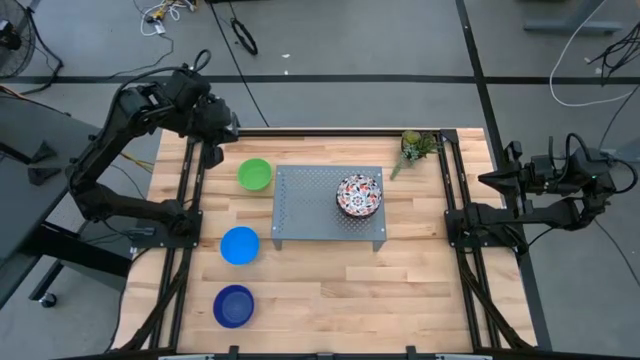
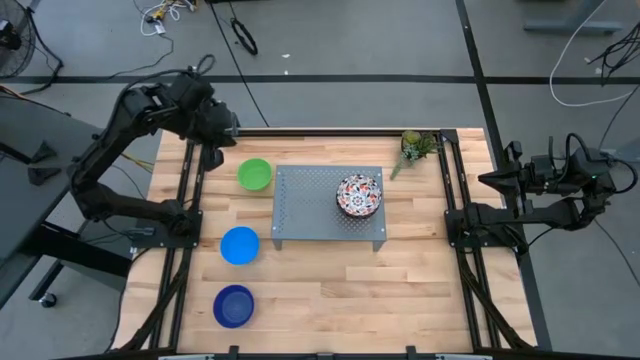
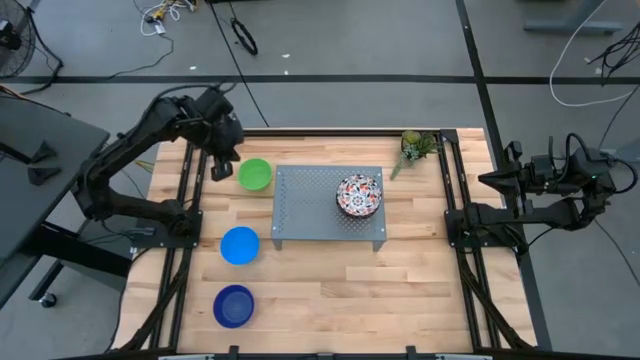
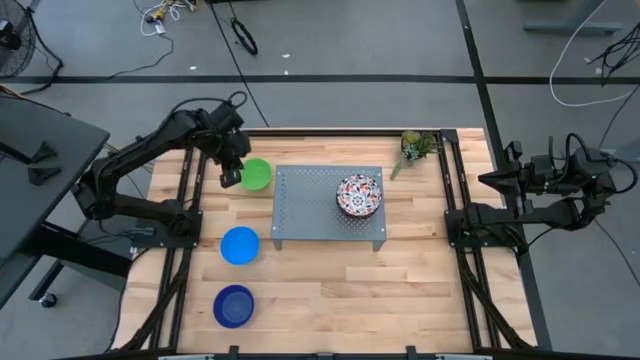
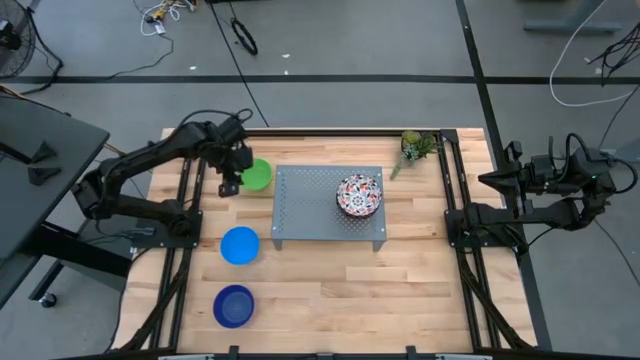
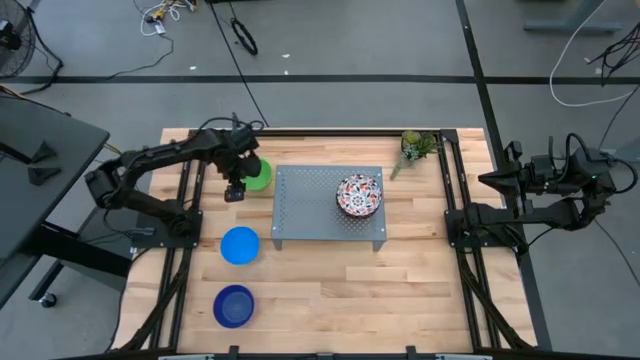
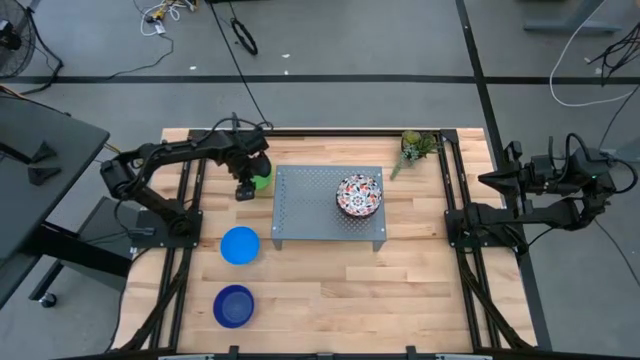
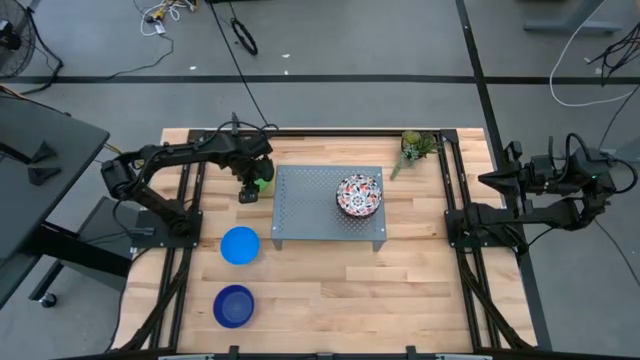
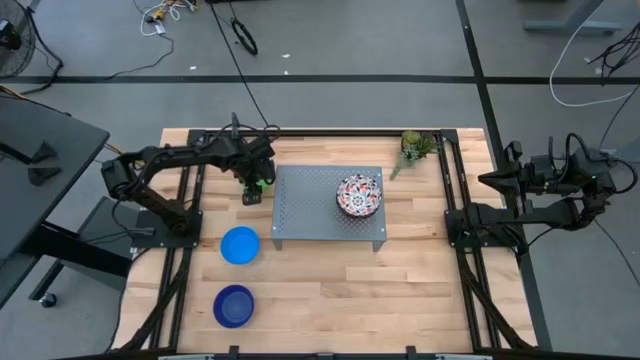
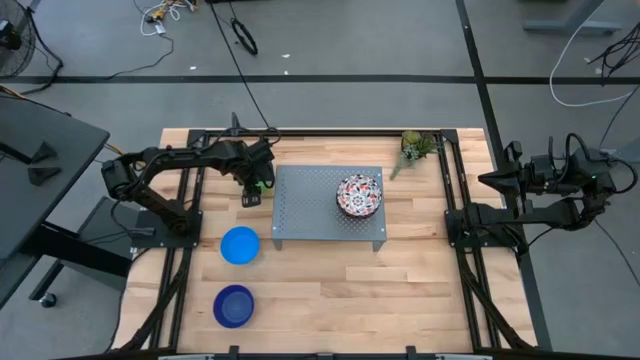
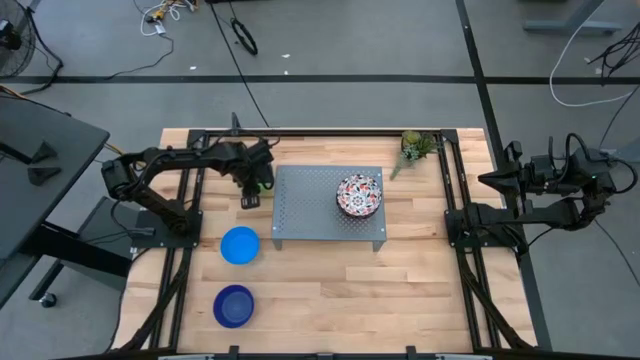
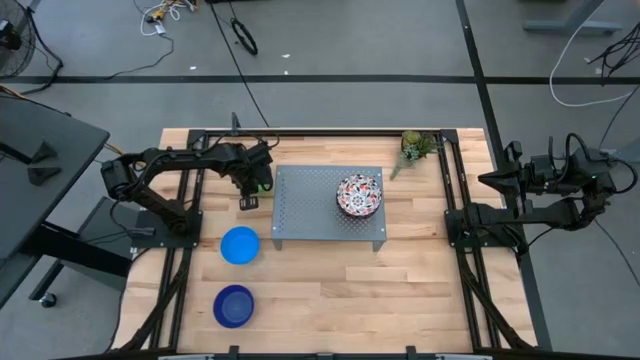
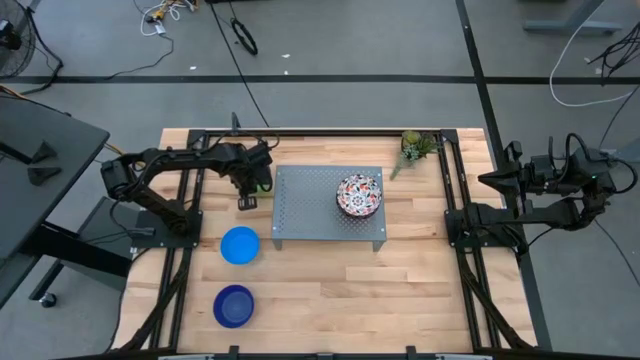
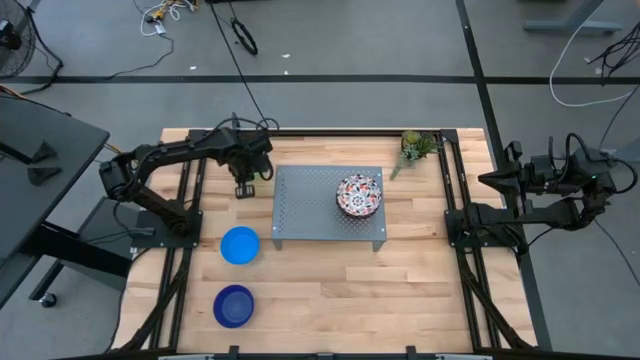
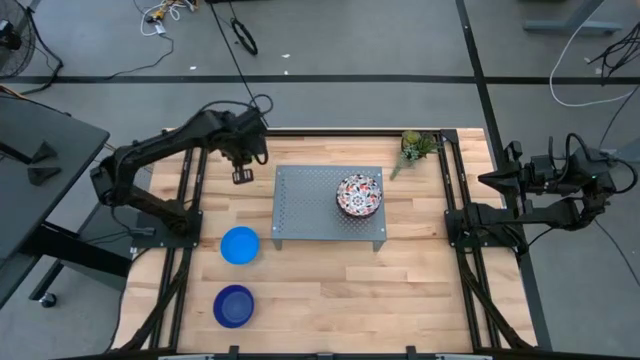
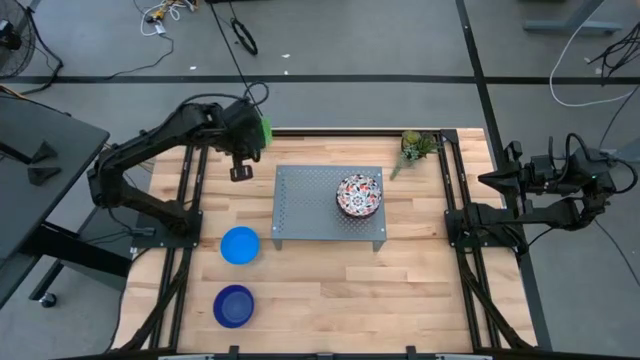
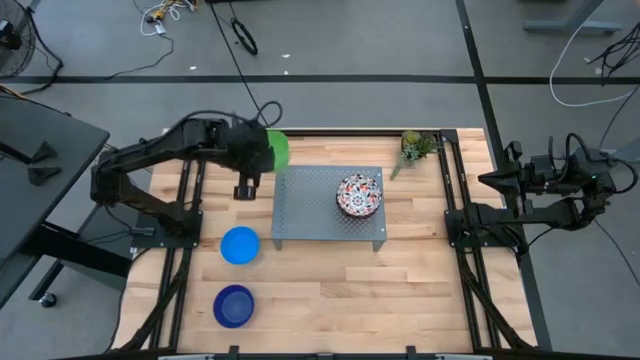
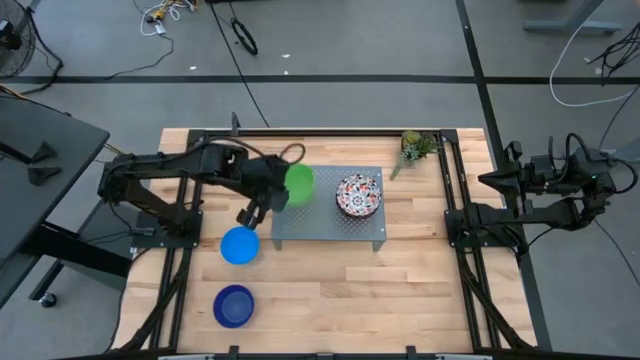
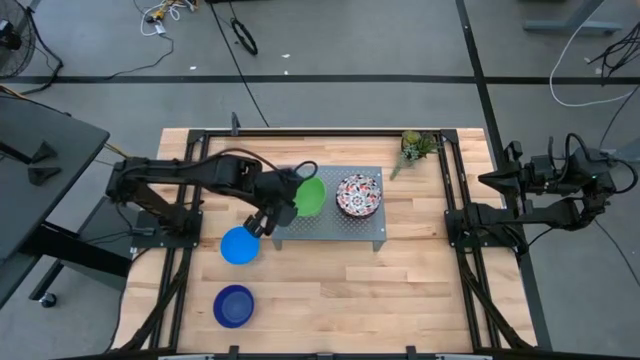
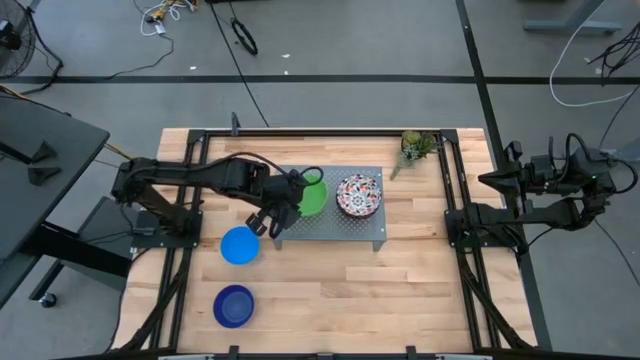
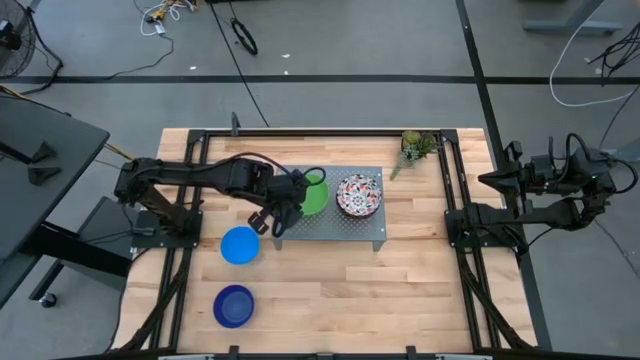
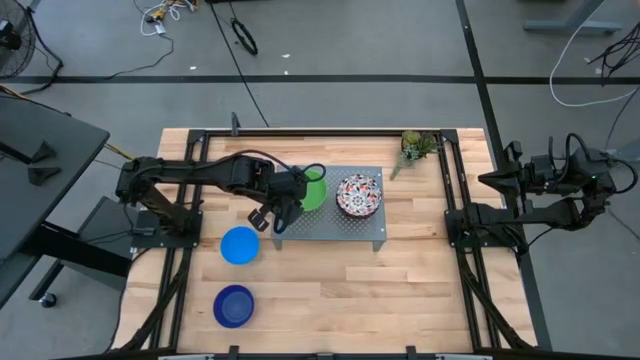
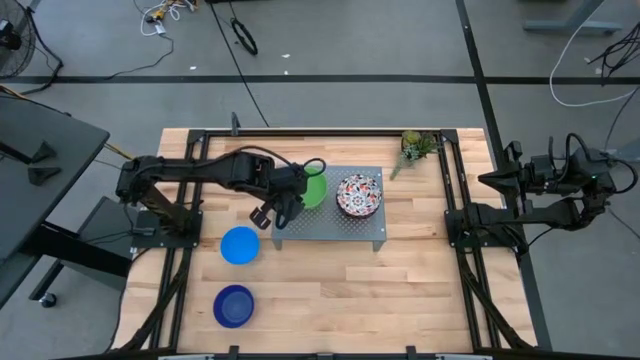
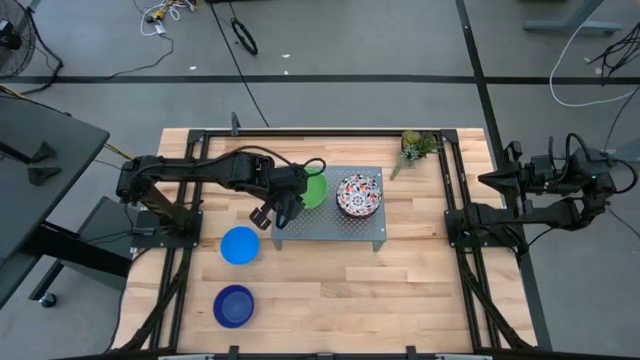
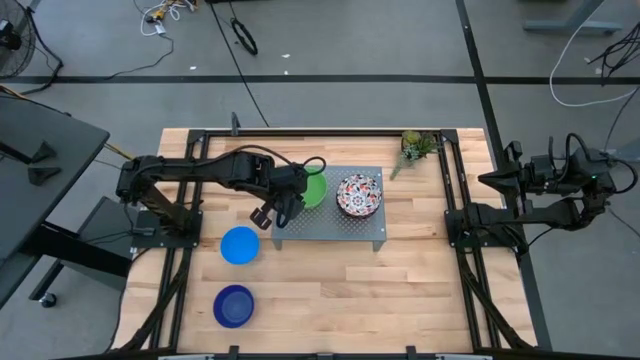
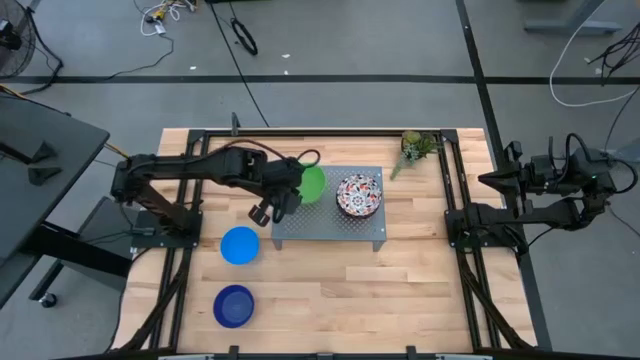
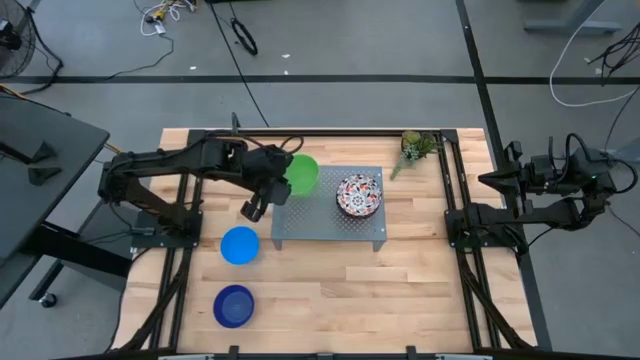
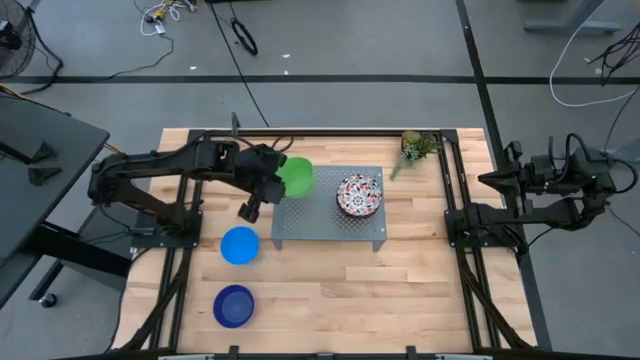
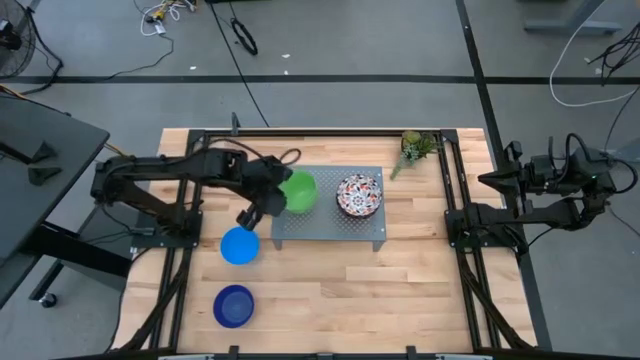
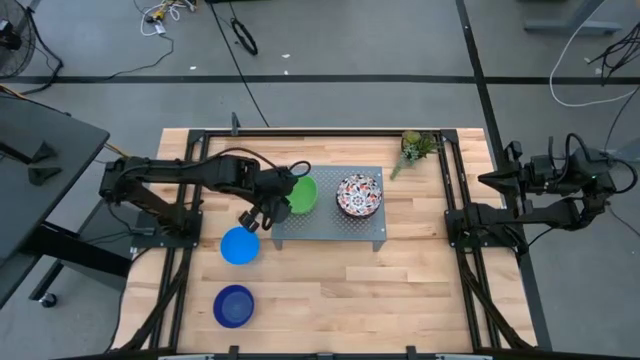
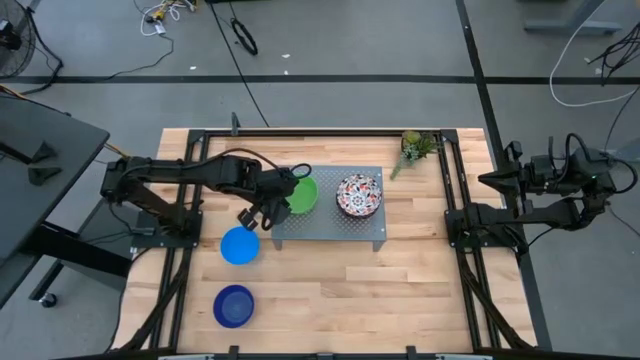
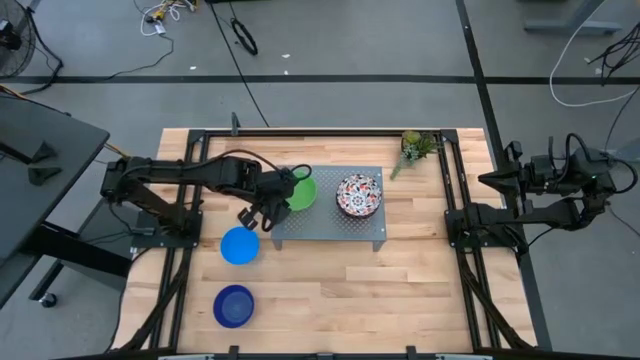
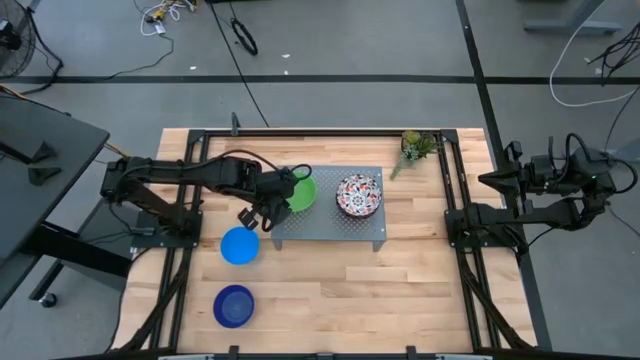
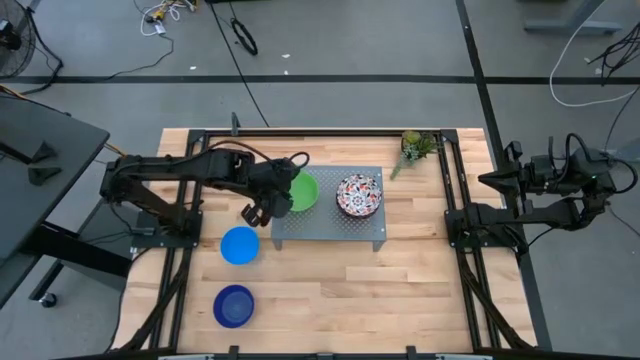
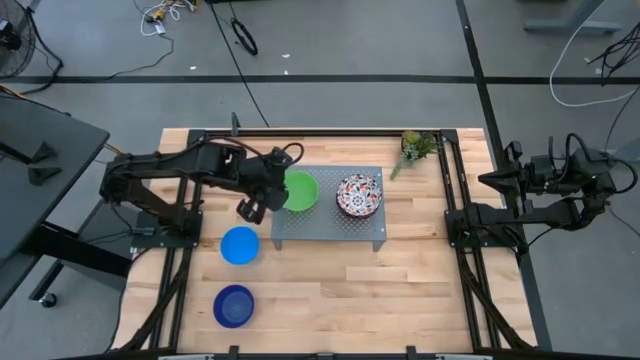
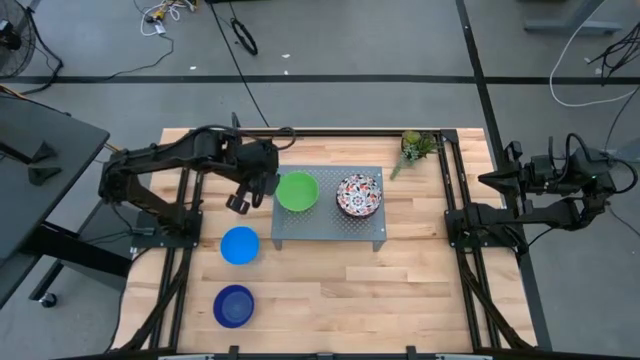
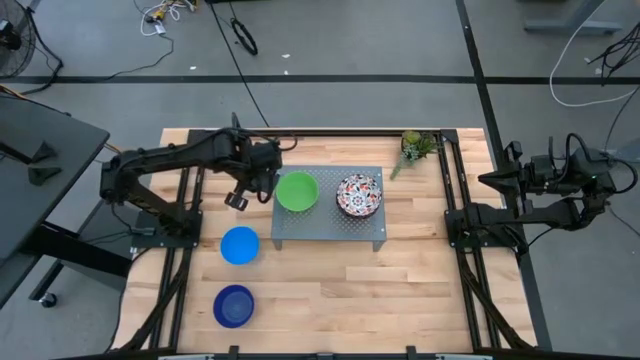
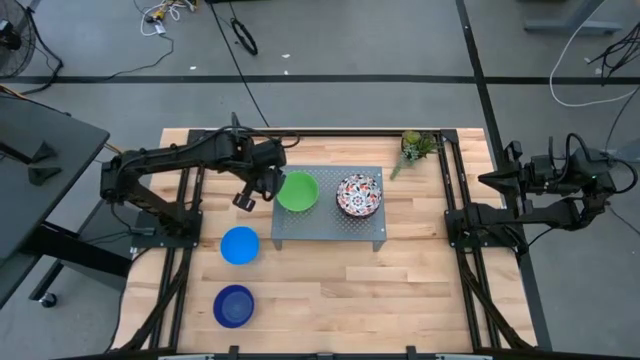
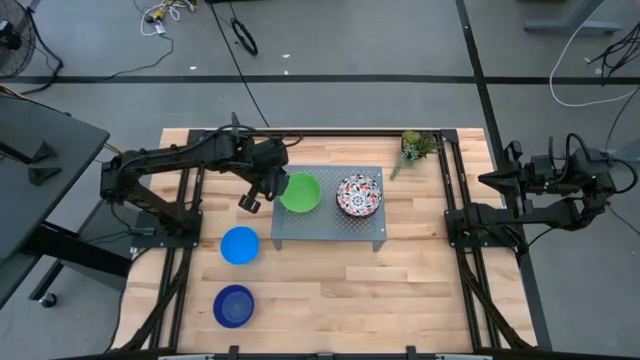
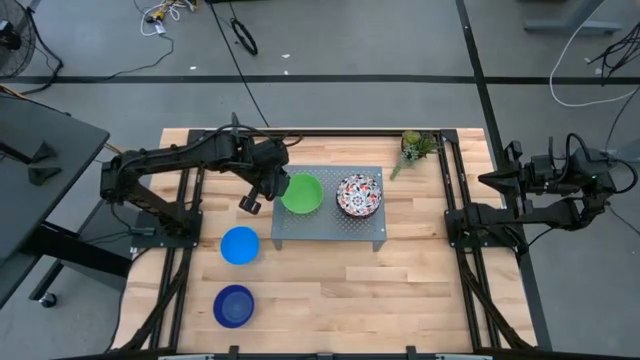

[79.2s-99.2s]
Task: Pick & Place Mini bowls
Put the light green plastic bowl on the shelf

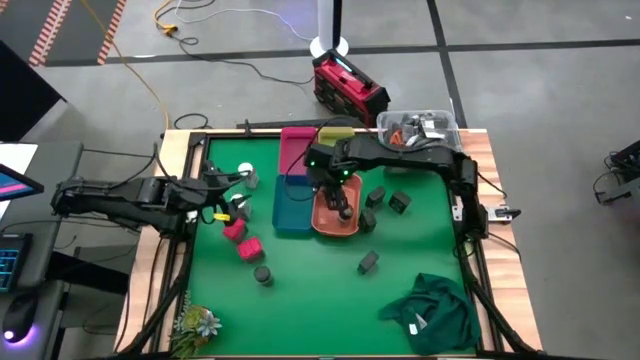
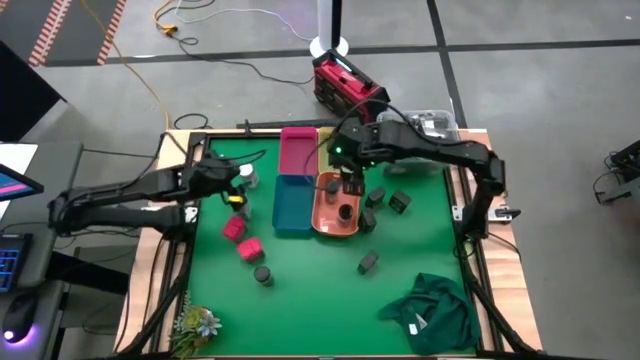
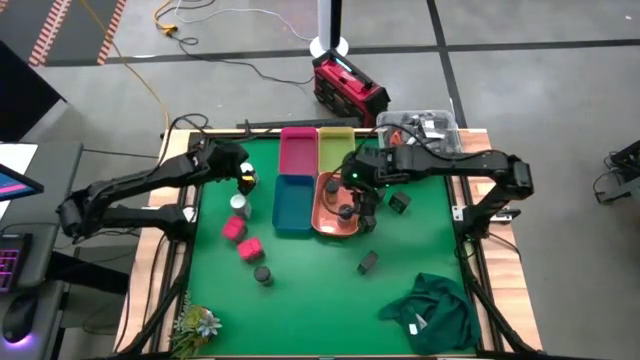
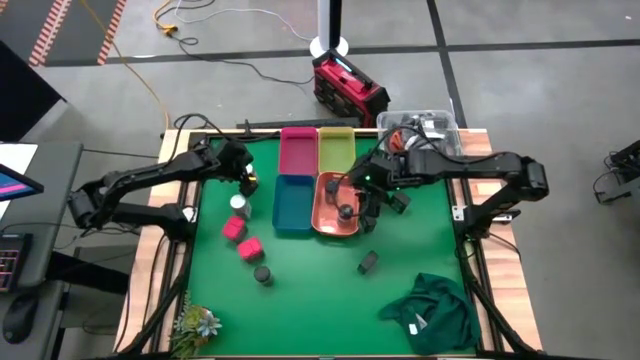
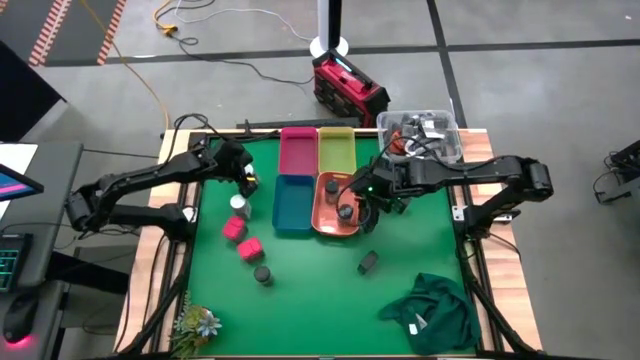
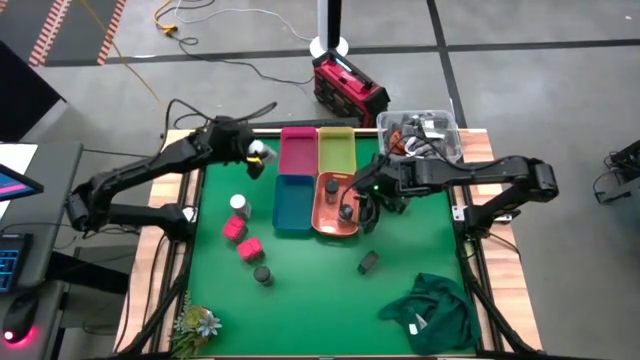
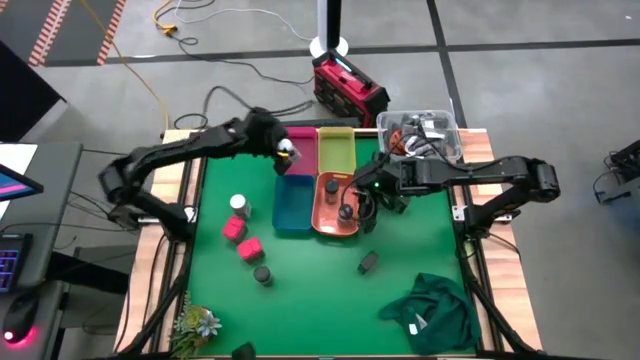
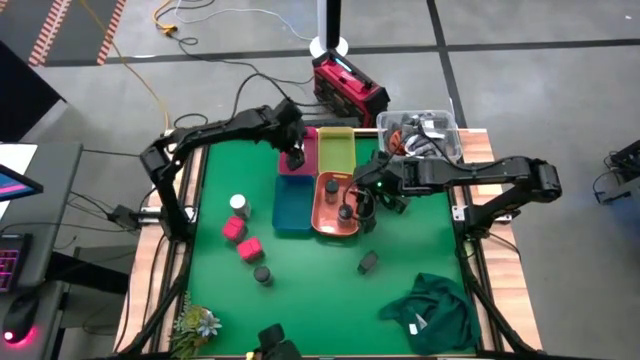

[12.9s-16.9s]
Task: Sort spices by type
Put the top white seasoning bottle into the pink tray
